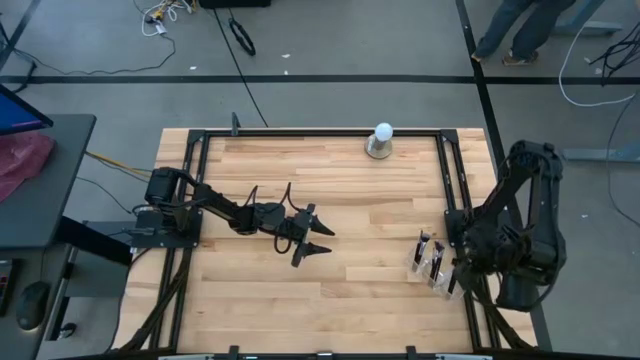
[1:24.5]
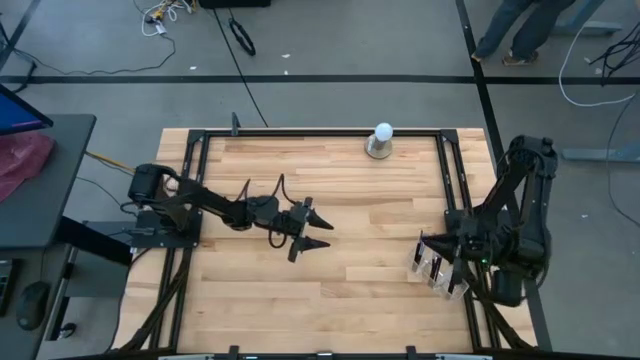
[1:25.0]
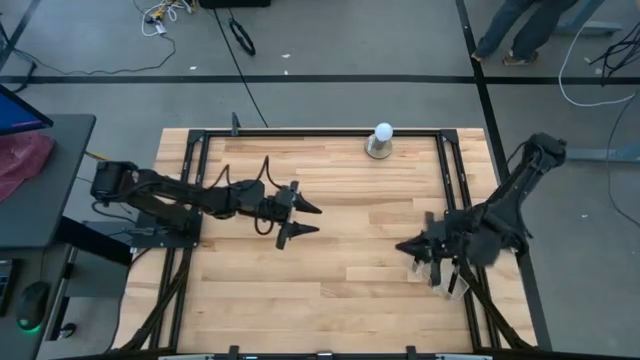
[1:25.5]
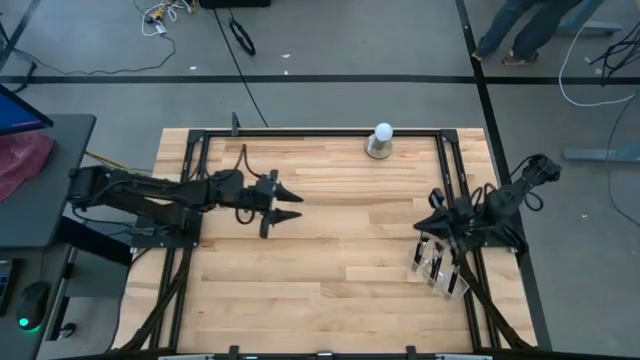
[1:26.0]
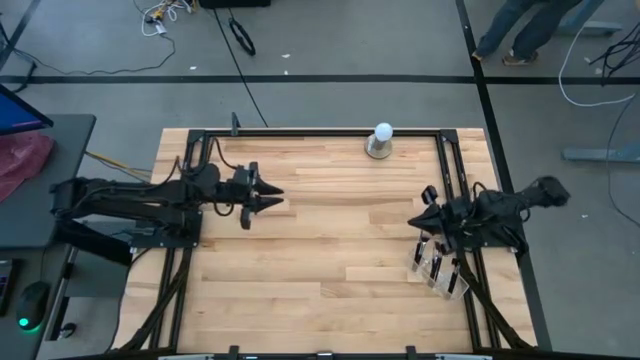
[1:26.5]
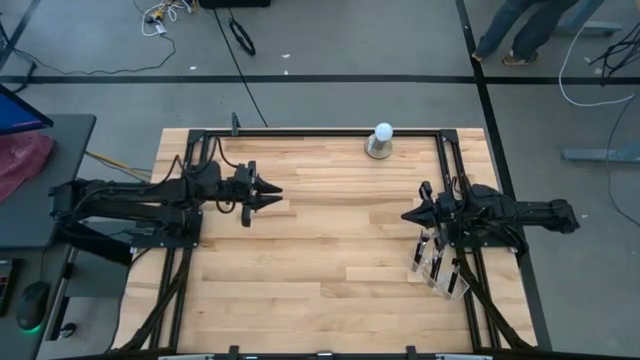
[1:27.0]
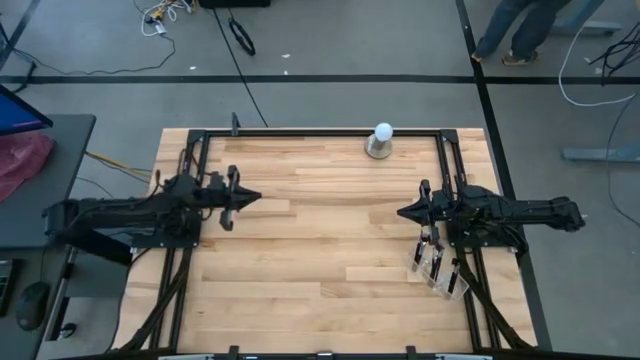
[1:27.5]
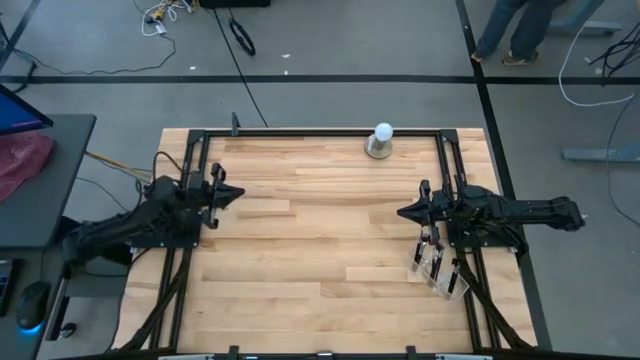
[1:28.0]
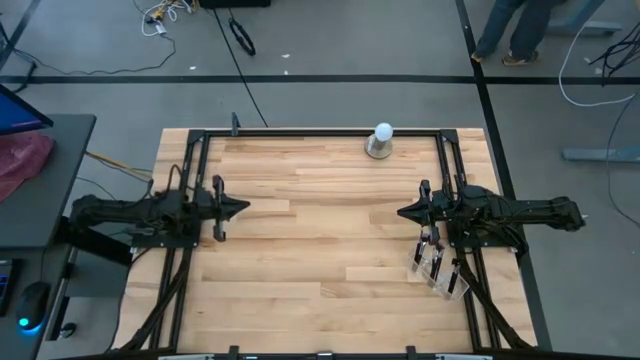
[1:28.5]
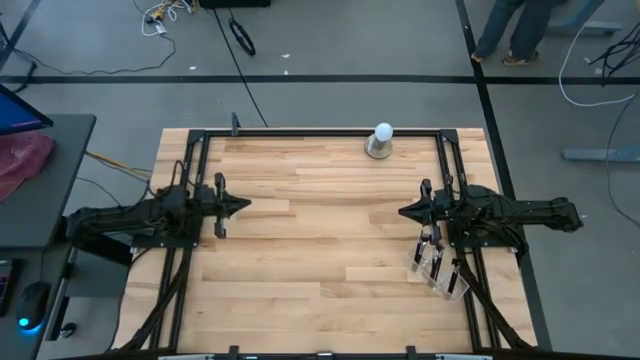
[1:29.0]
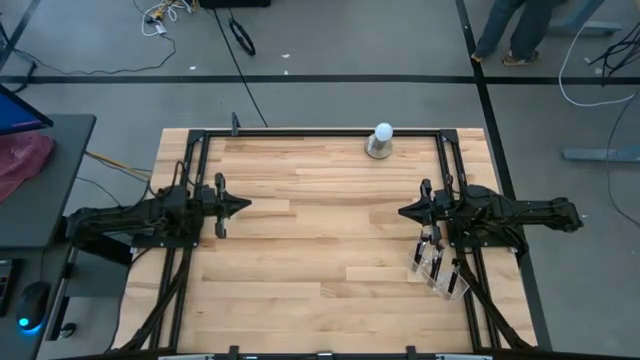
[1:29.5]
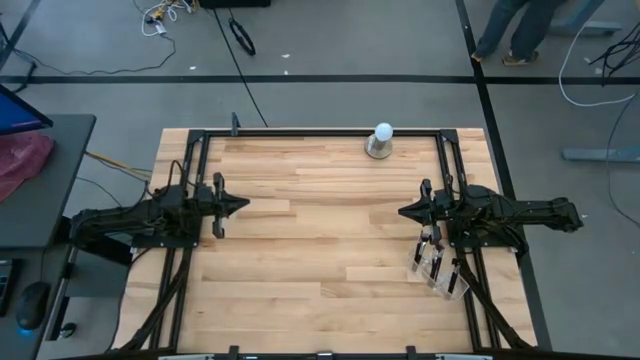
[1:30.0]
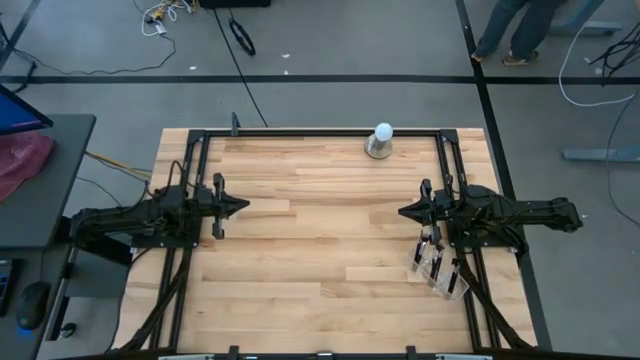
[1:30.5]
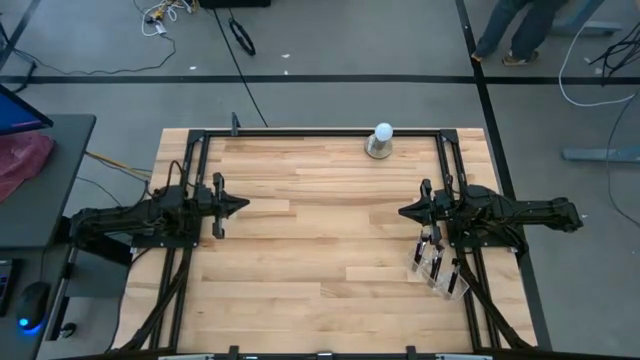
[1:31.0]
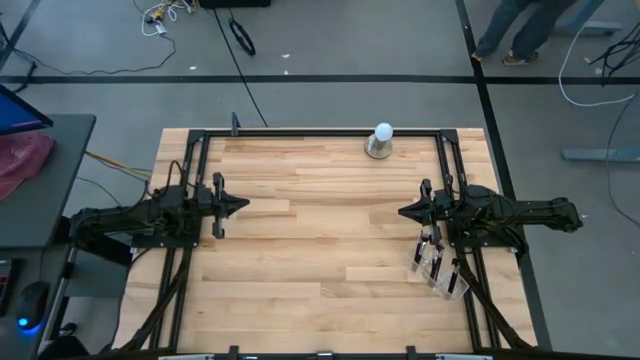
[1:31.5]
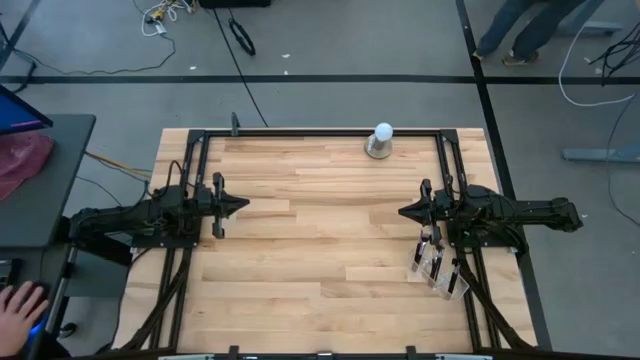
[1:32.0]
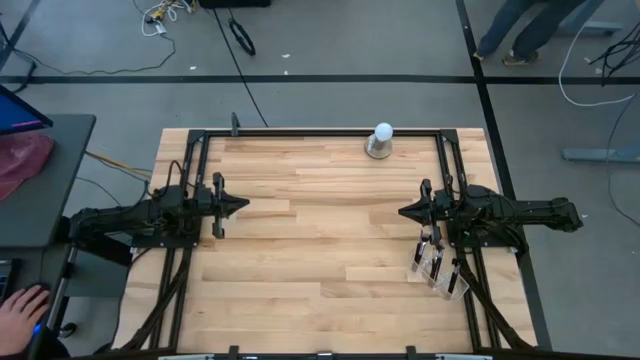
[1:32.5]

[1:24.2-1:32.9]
Task: Put items in baskets/containers
Return to Home Position

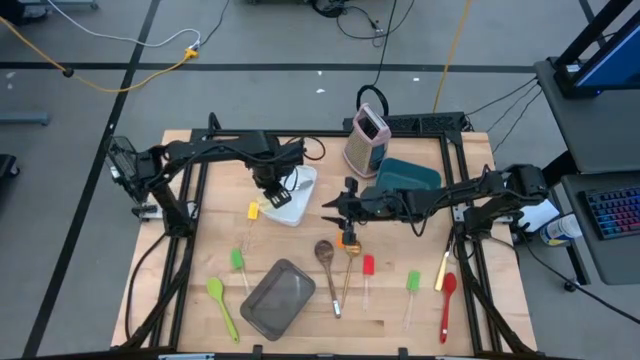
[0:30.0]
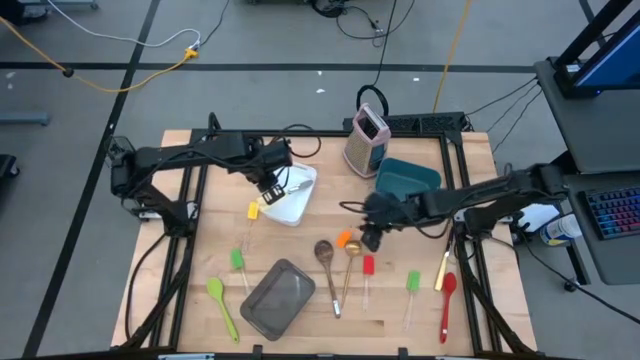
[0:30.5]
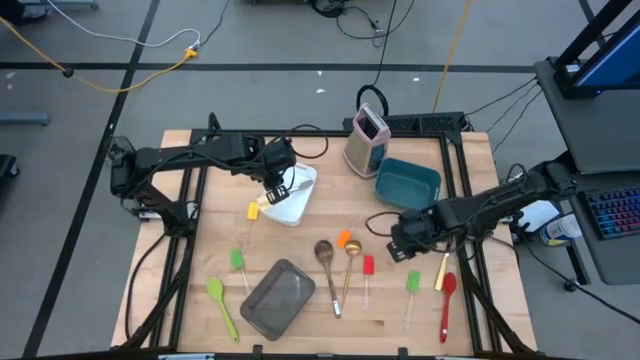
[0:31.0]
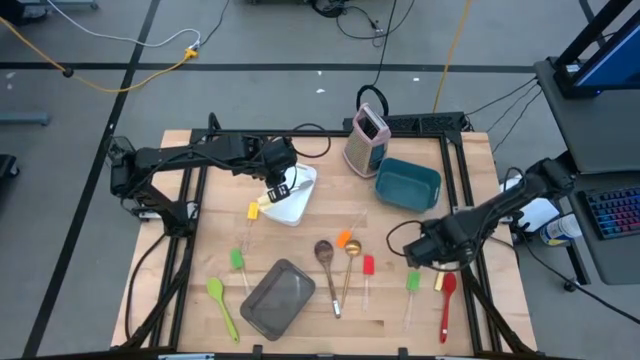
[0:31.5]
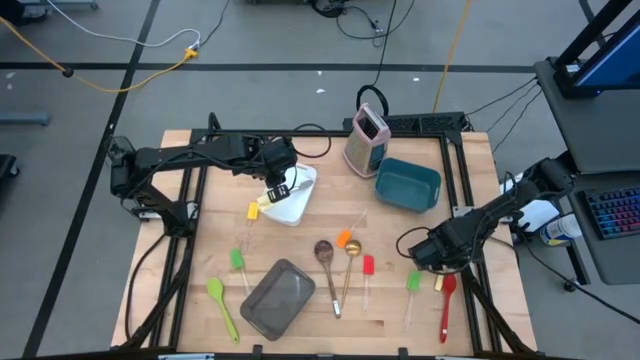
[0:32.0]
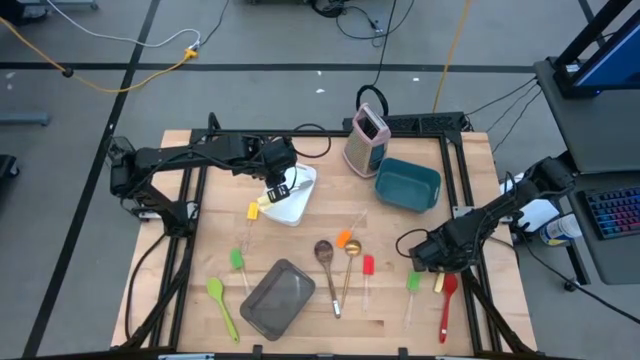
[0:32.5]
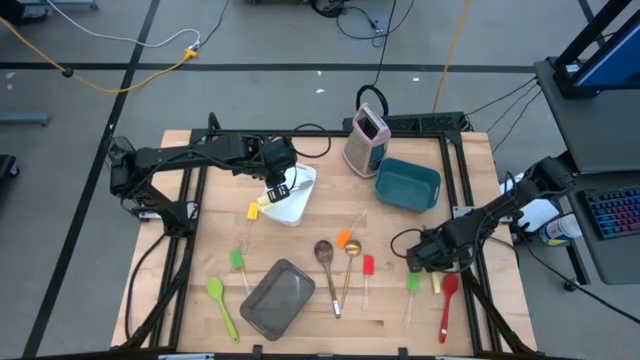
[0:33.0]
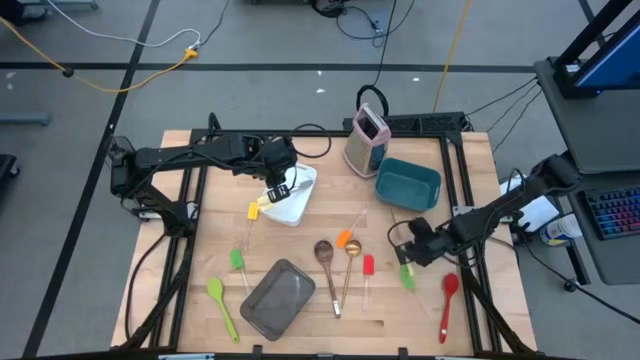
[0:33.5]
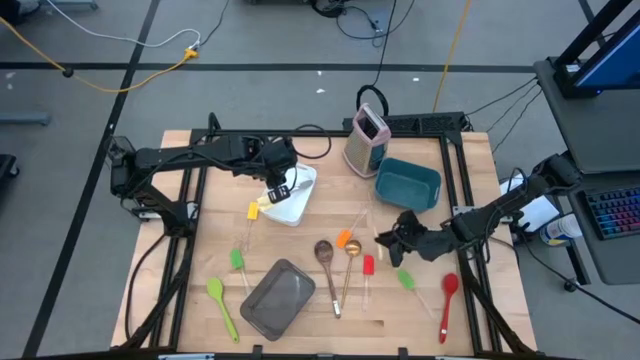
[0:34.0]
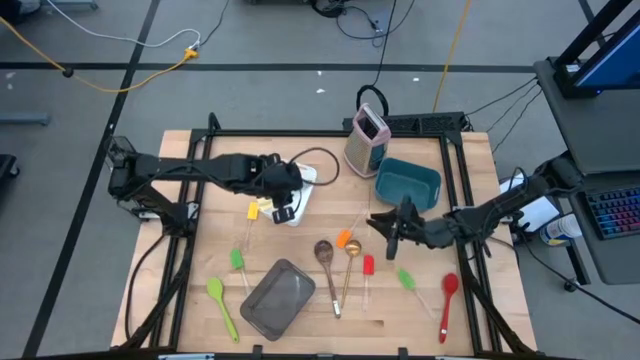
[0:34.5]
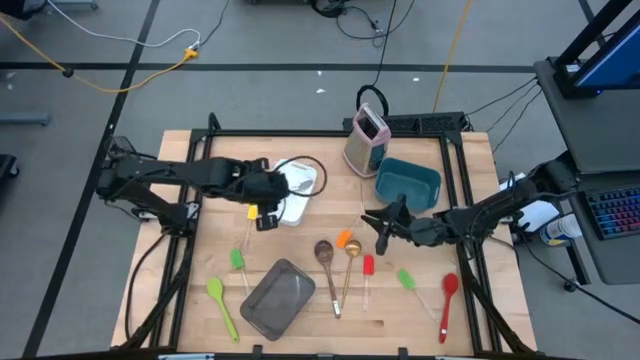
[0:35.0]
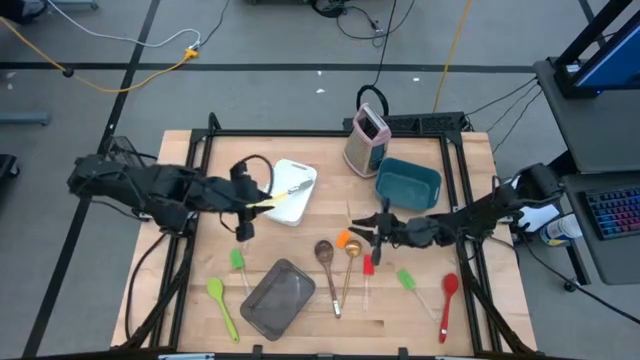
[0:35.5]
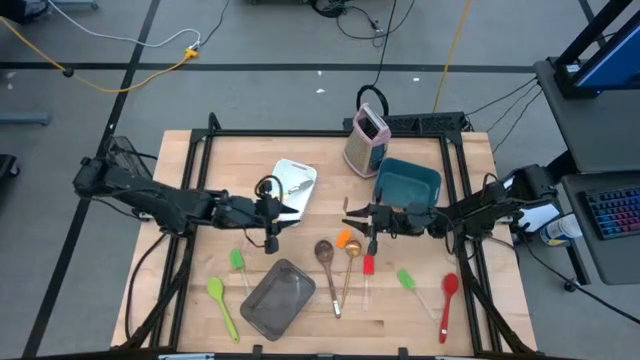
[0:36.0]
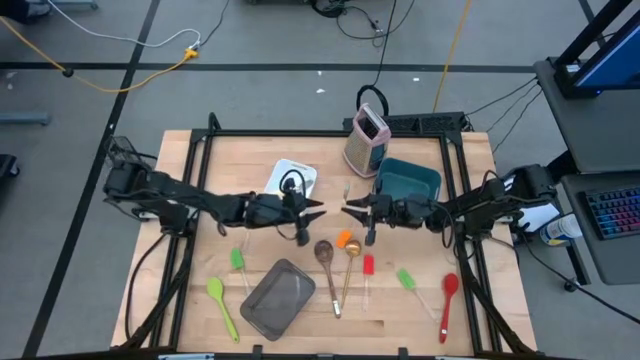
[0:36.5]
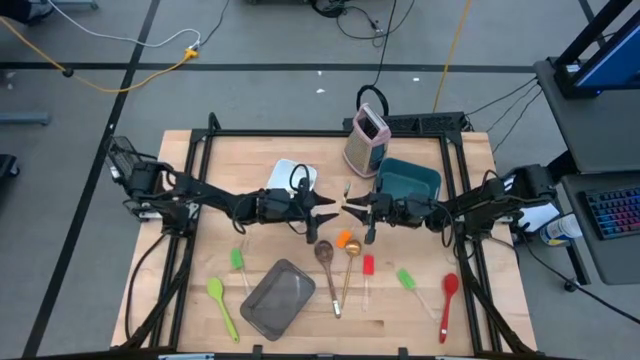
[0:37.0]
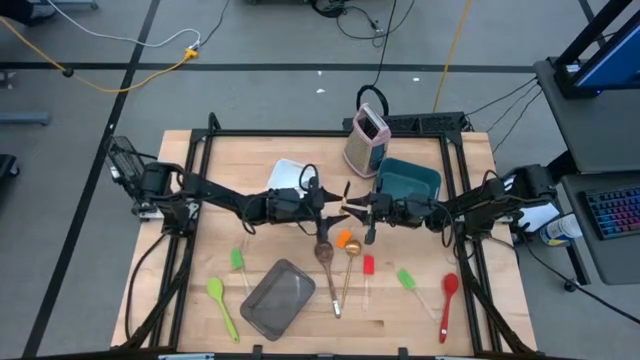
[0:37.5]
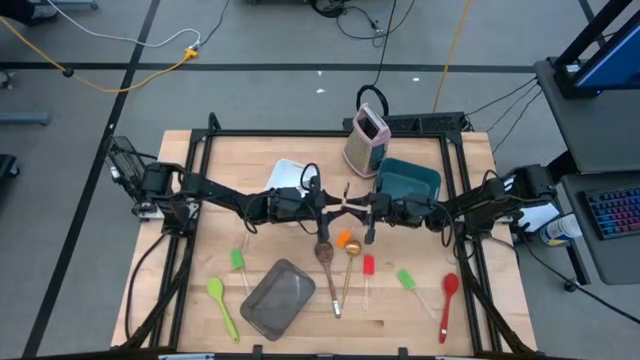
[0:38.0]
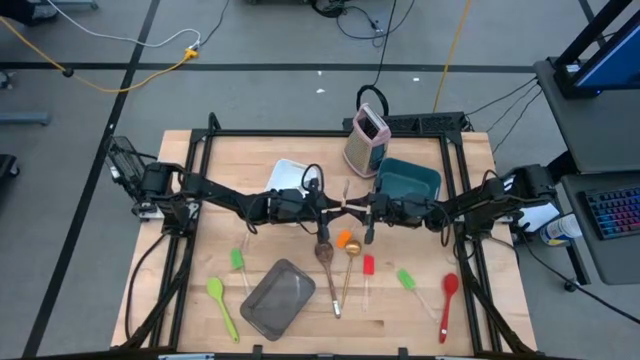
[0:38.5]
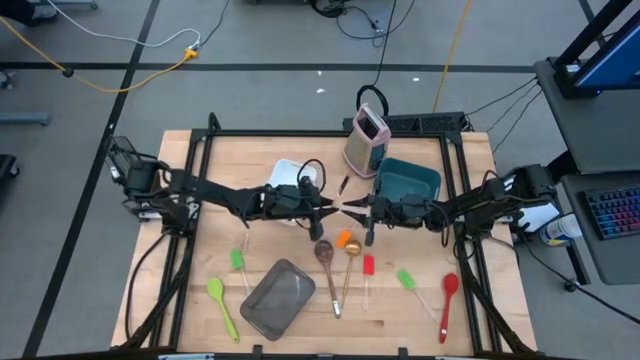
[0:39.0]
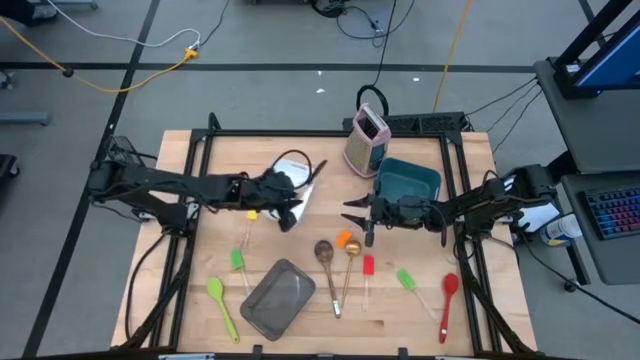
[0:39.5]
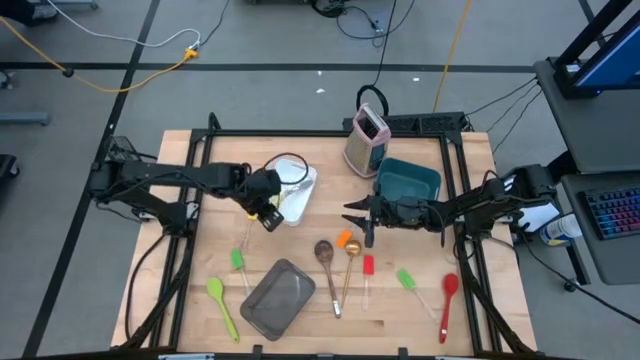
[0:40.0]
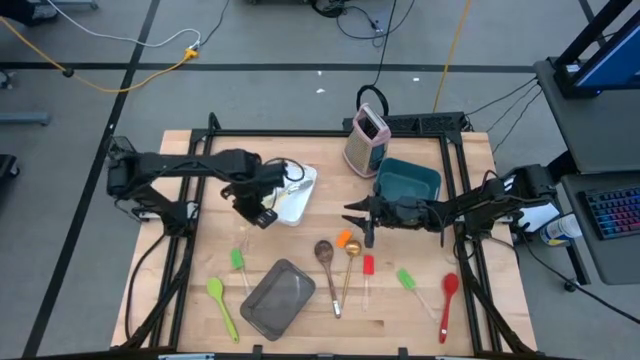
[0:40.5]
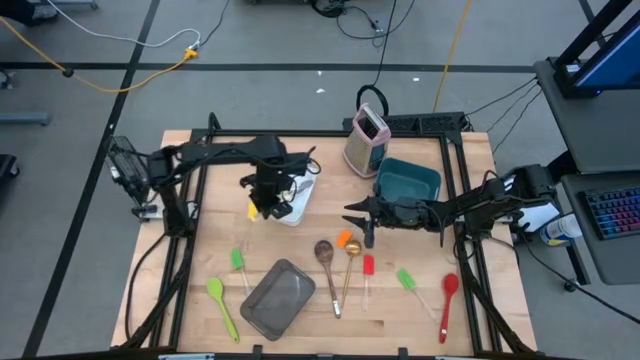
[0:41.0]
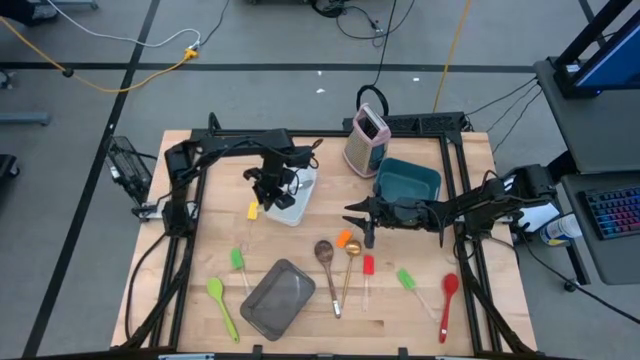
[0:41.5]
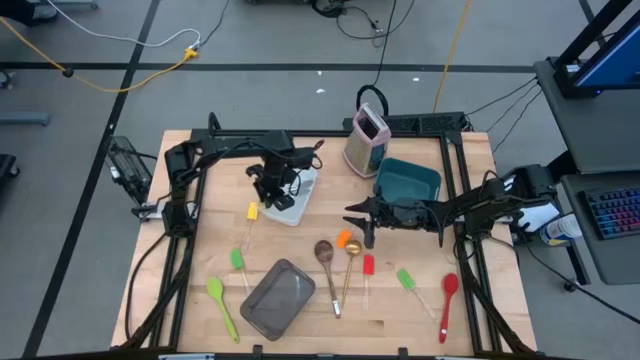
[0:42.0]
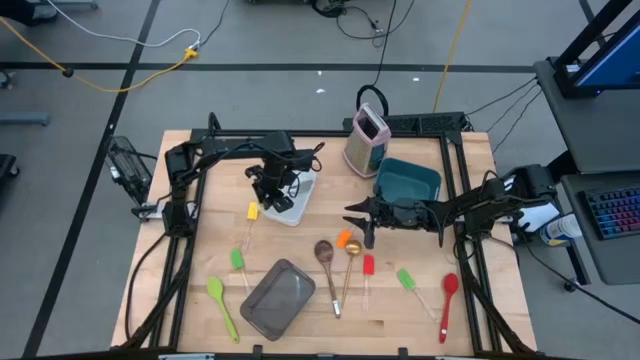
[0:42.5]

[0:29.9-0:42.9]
Task: Pick & Place Kitchen Items
Put the white table knife into the white bin
